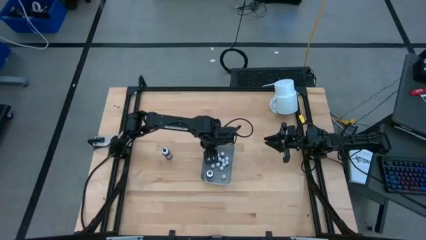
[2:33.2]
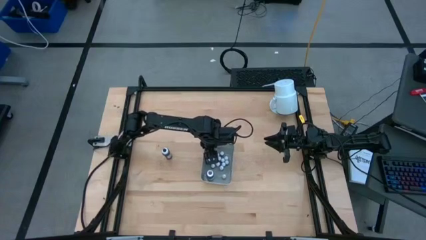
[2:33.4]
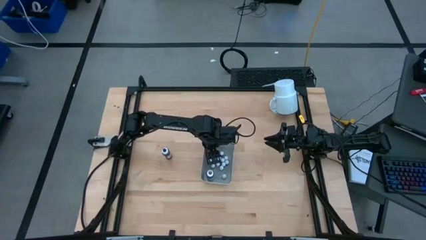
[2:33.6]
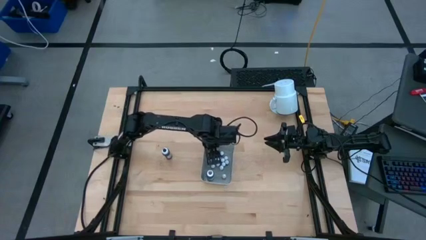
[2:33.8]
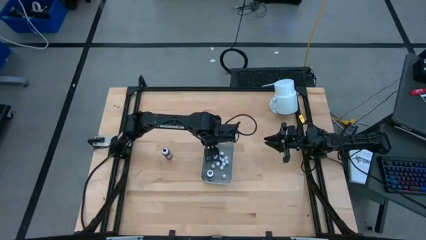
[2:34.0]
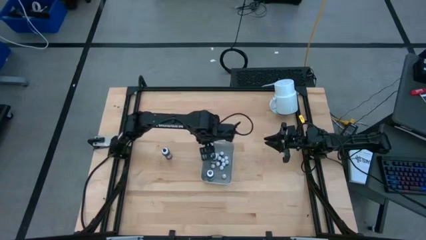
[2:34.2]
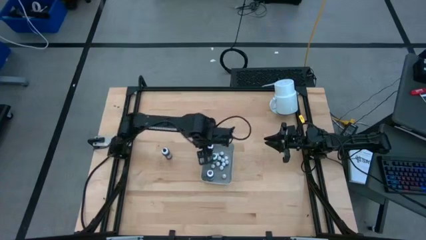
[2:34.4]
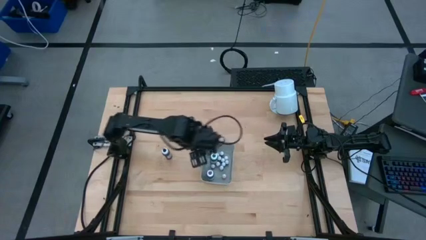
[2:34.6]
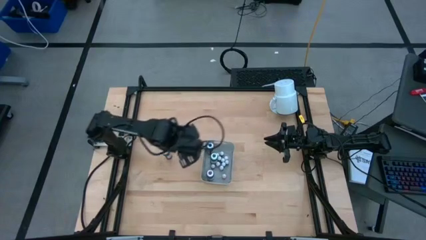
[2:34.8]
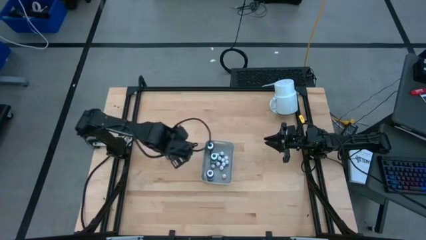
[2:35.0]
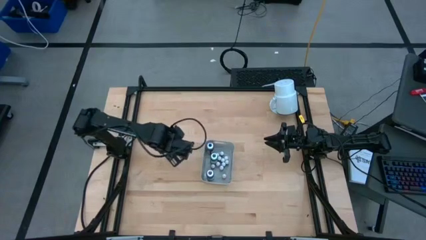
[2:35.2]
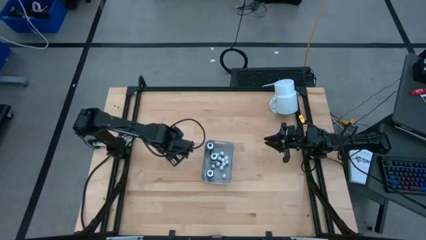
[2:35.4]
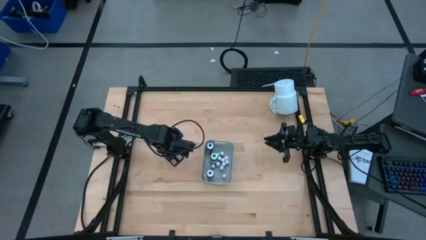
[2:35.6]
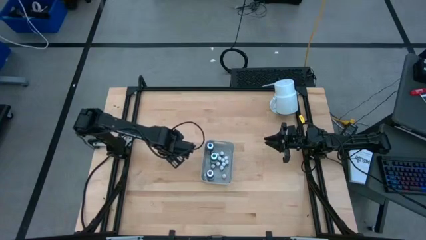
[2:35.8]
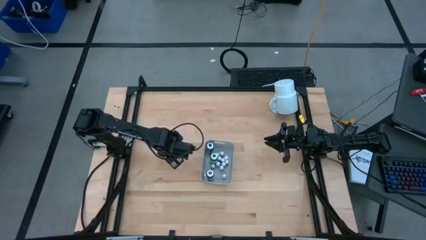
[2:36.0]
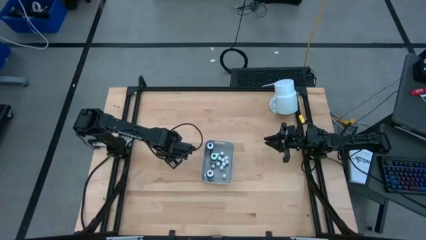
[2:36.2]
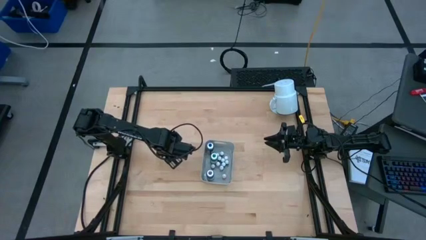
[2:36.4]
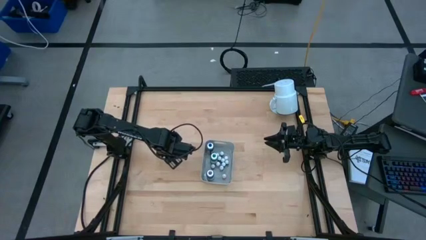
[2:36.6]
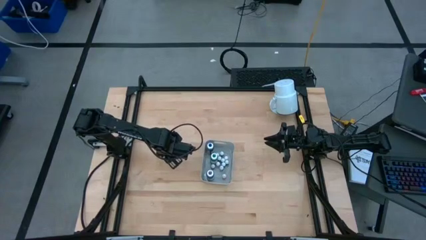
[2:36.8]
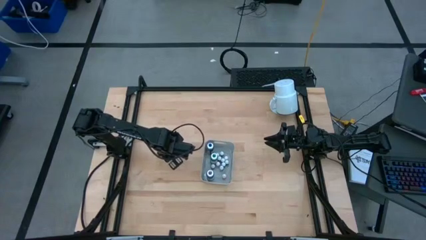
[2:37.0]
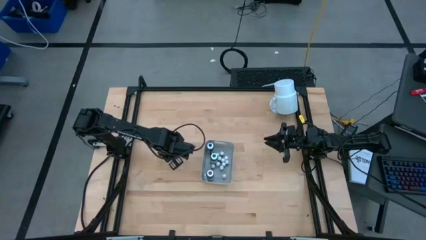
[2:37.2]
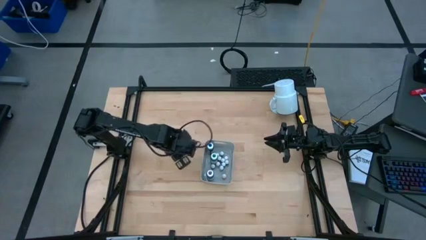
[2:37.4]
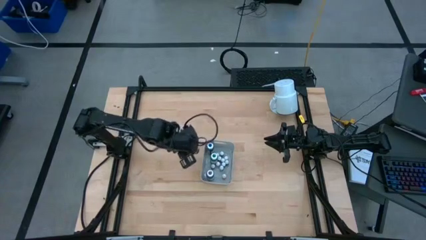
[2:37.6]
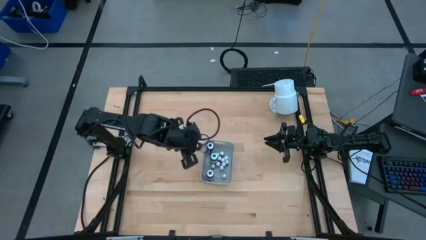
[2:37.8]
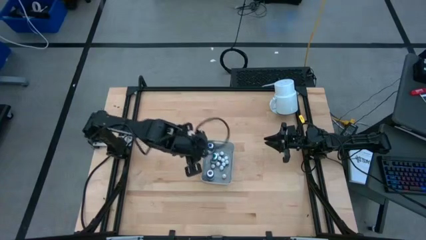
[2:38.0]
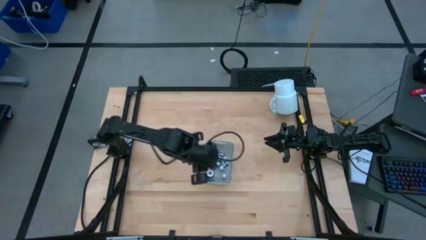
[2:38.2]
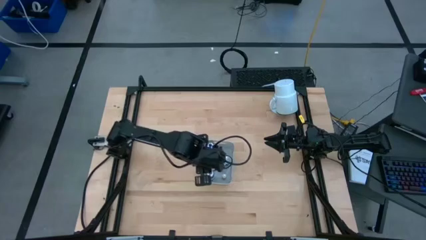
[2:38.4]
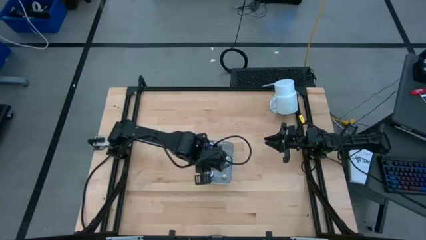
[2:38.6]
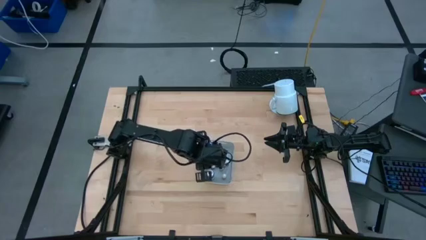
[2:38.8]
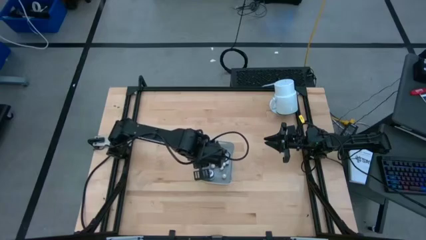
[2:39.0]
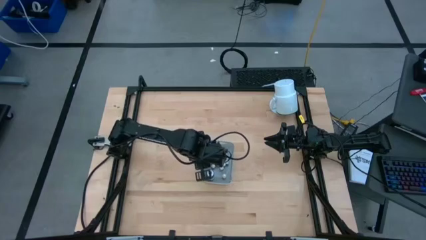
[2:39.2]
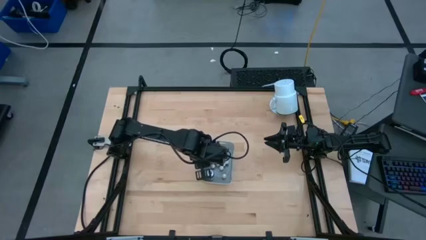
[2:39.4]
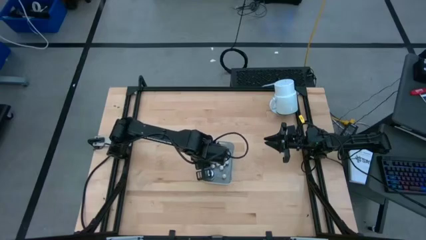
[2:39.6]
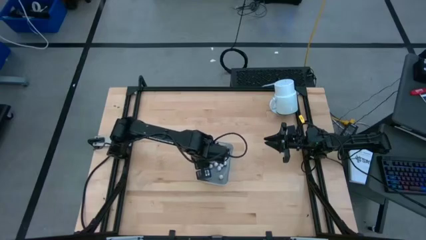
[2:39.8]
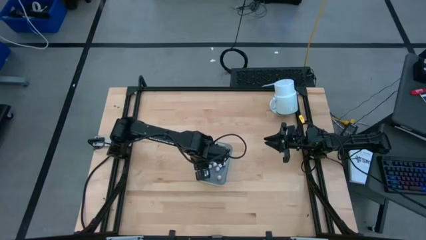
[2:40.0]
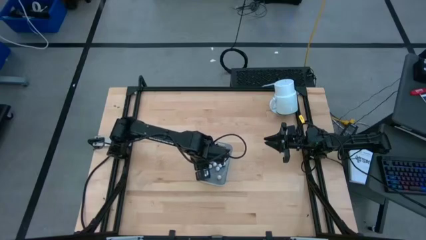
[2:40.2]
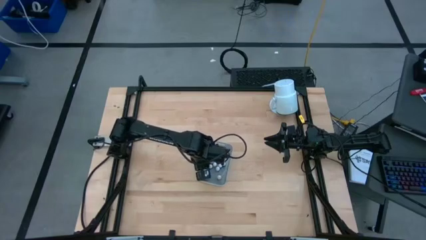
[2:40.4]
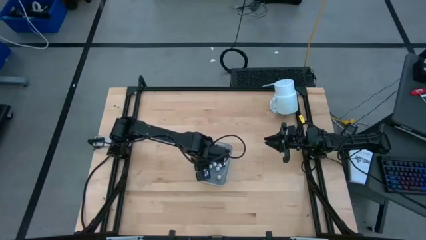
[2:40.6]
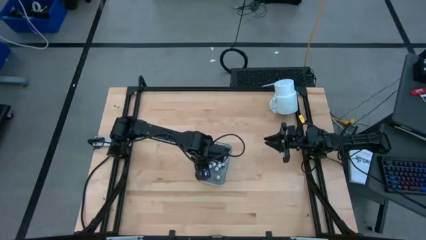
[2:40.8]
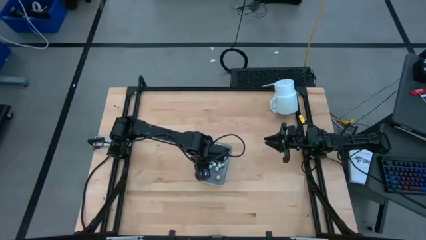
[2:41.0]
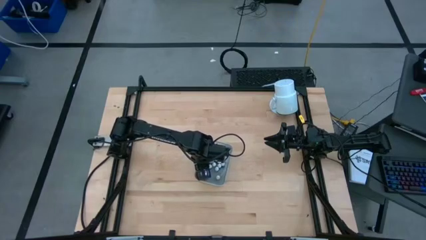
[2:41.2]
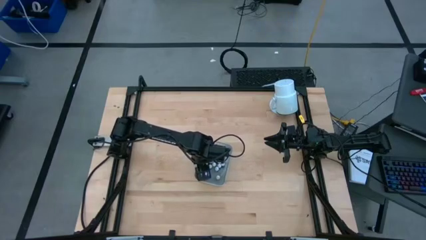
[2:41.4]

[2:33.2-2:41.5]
Task: Pick & Place food coloring
Put the large black food coloring bottle into the white bin

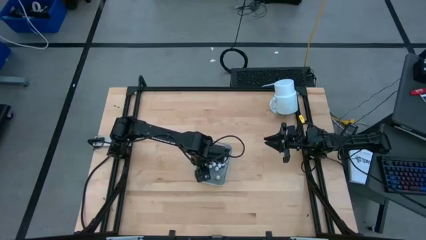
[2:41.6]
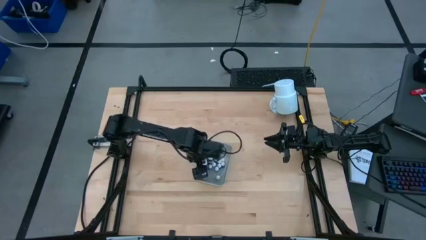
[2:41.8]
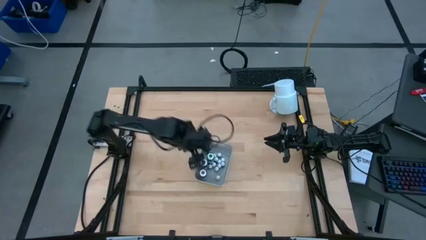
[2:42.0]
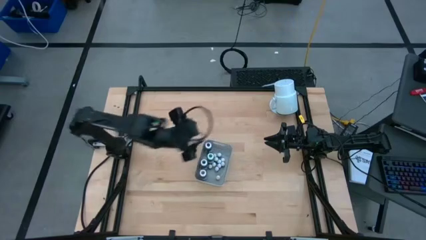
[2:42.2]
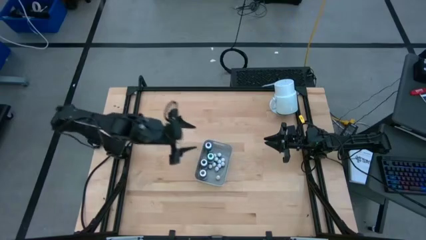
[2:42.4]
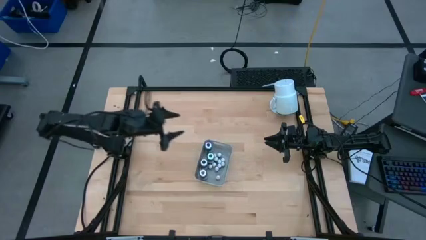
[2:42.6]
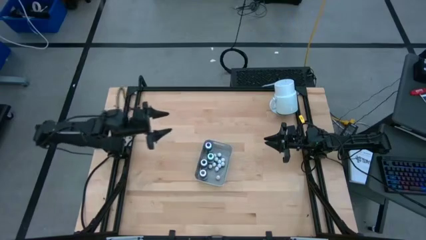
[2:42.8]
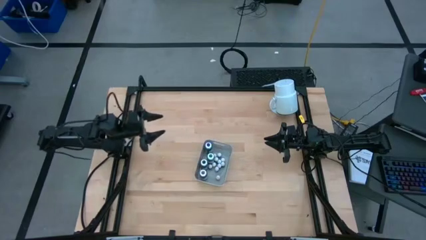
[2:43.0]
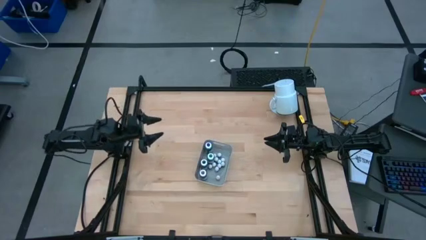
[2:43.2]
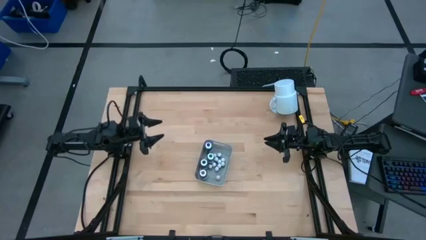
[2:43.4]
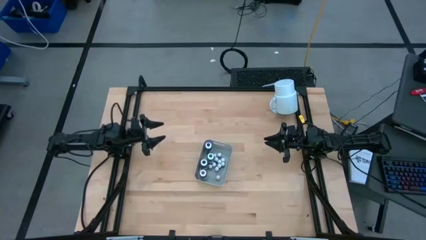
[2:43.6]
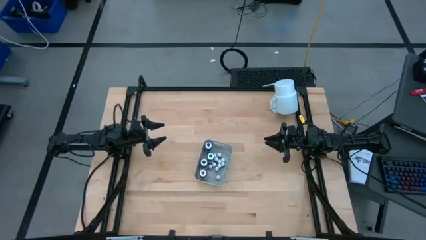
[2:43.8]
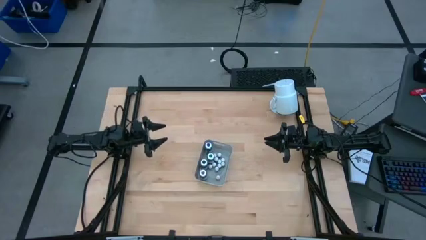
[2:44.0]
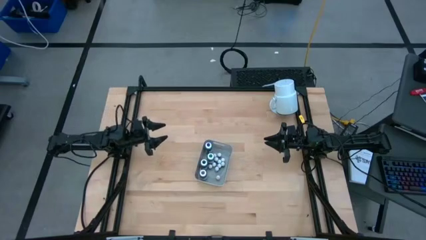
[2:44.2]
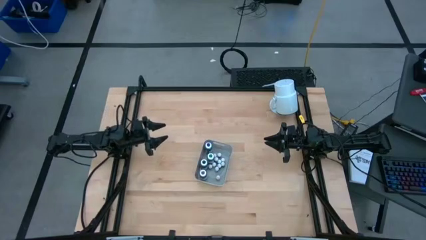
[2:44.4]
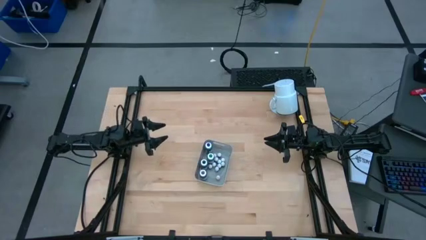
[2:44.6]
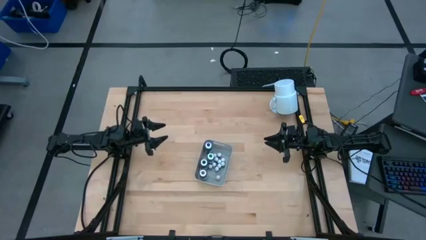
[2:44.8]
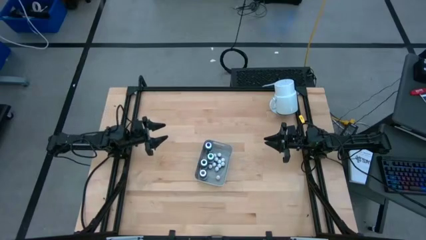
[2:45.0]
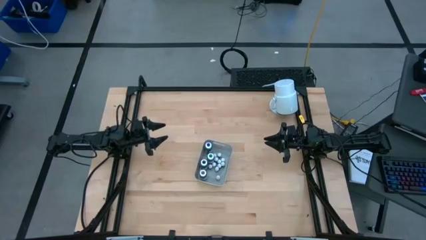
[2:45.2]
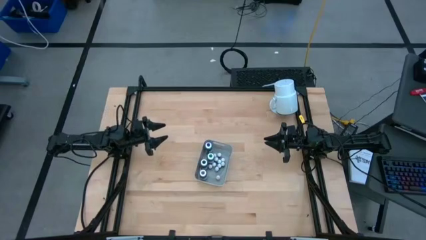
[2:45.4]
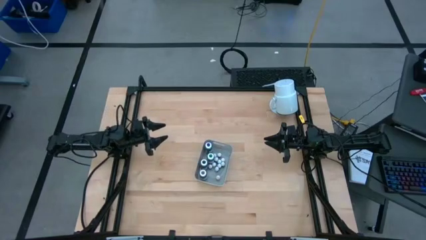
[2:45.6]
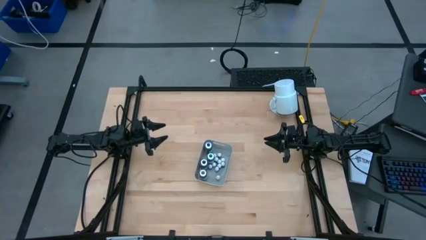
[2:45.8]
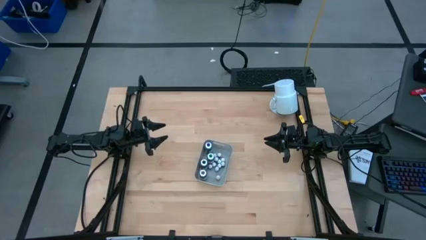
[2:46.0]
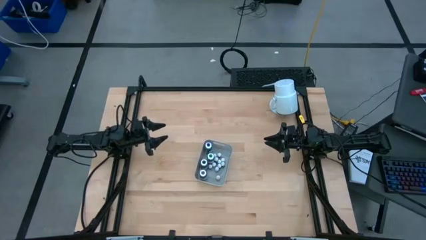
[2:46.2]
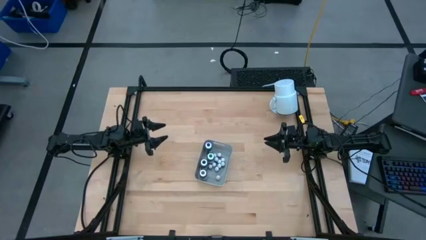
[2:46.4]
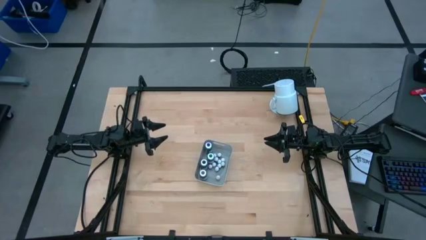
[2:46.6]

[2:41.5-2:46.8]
Return to Home Position

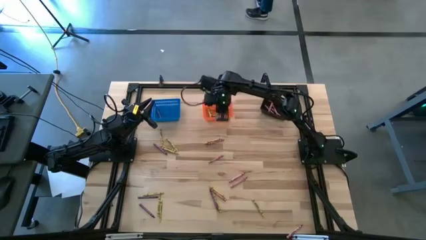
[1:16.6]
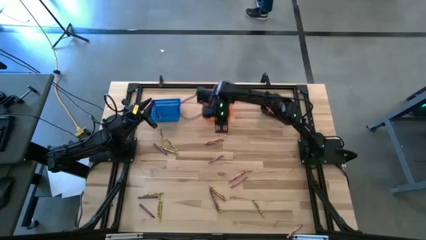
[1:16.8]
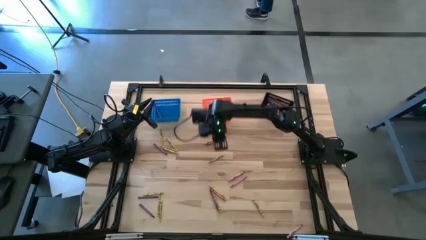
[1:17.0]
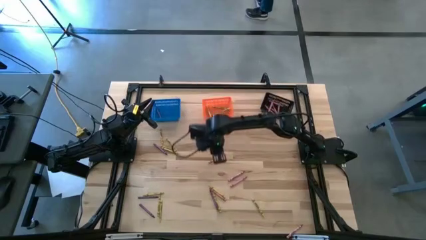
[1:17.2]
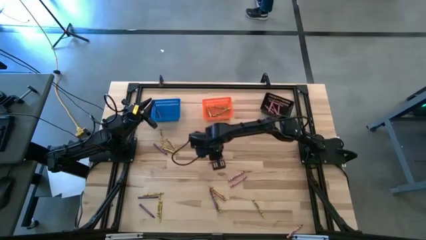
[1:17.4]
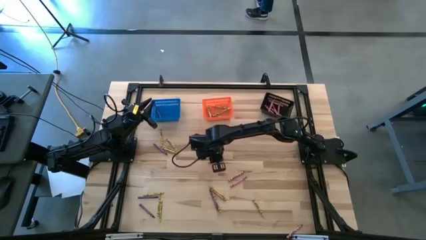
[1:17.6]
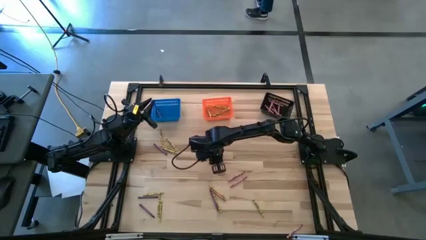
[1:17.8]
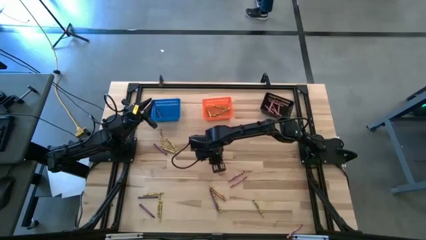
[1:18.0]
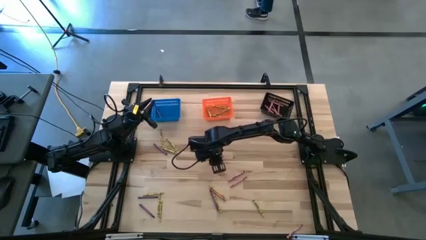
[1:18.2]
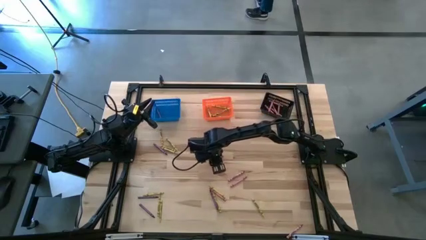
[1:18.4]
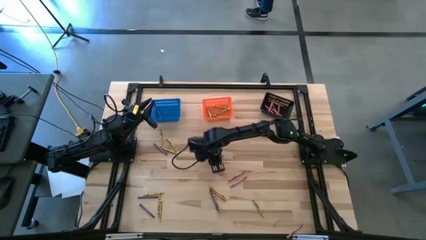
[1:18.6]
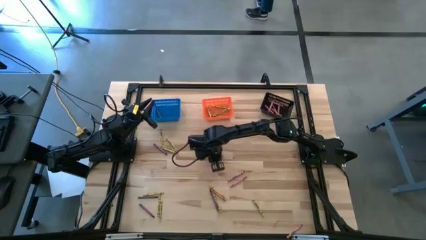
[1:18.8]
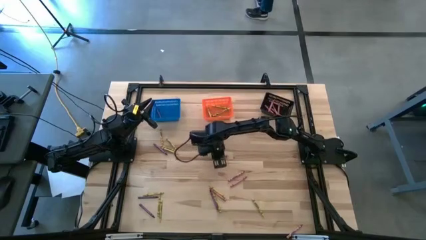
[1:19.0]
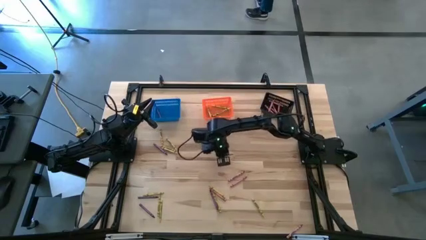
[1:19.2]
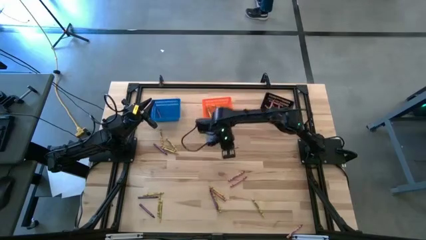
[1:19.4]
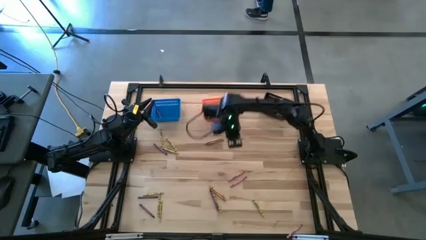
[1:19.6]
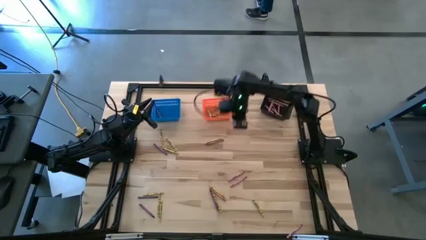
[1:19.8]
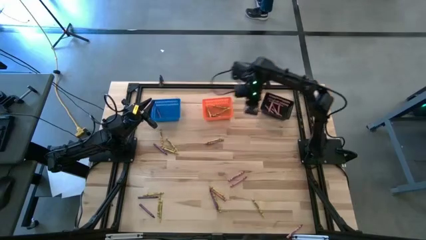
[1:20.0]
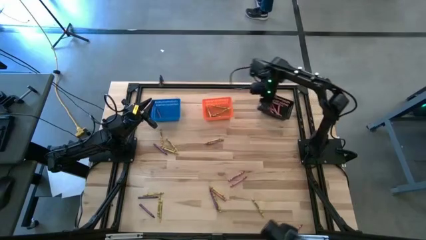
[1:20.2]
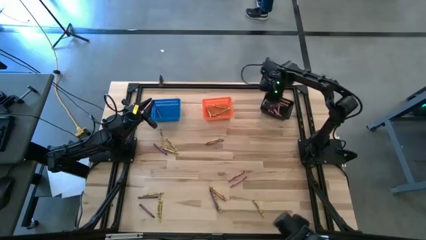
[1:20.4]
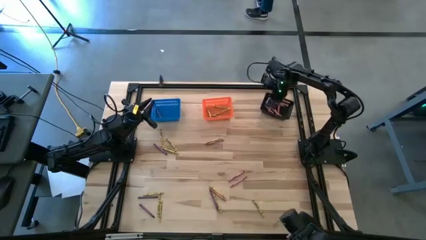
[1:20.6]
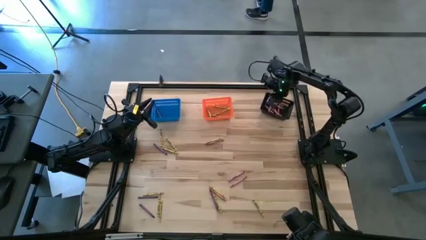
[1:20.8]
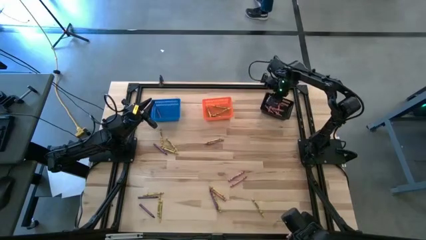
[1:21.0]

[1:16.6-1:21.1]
Task: Sort crayons
Put the red crayon into the black bin
